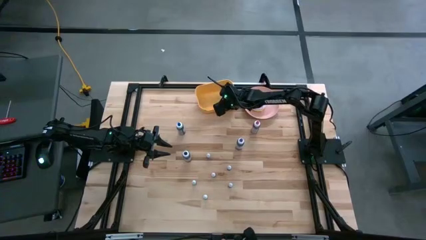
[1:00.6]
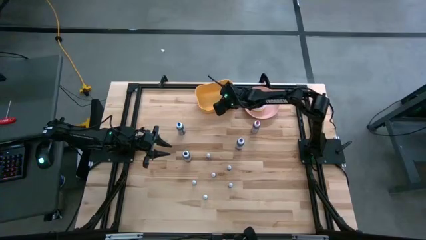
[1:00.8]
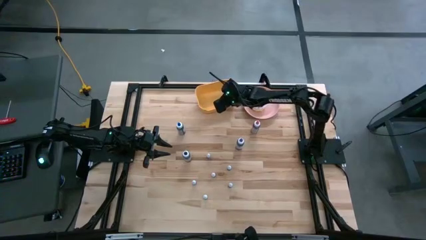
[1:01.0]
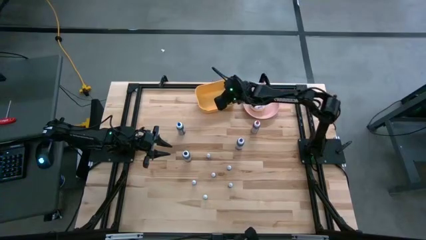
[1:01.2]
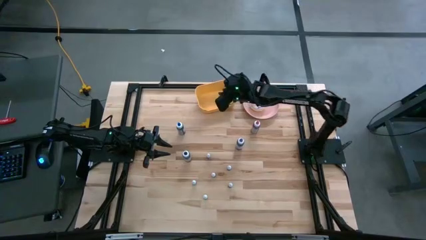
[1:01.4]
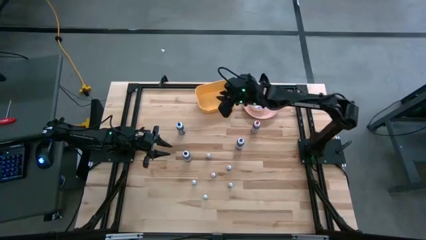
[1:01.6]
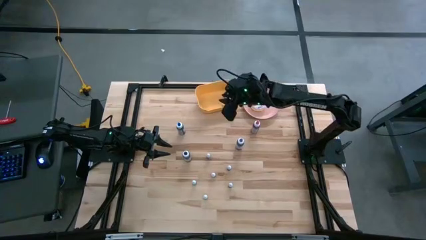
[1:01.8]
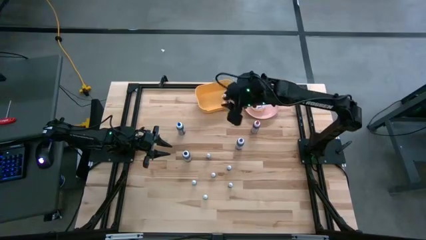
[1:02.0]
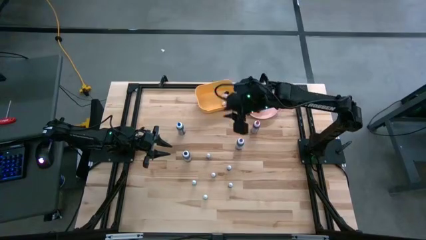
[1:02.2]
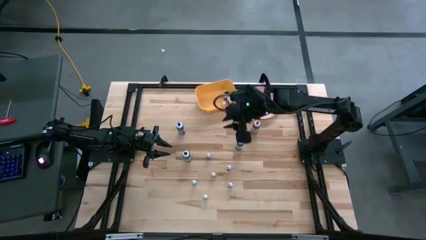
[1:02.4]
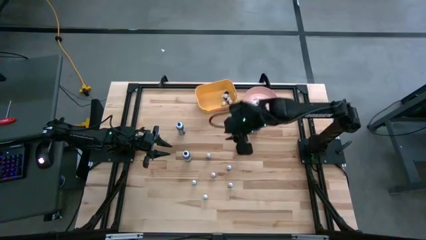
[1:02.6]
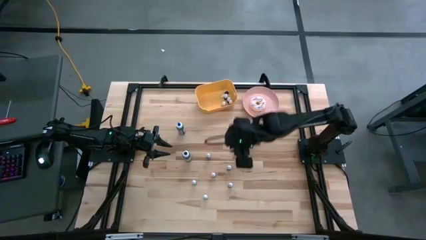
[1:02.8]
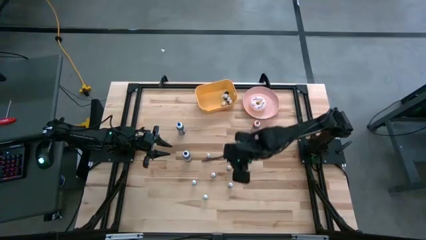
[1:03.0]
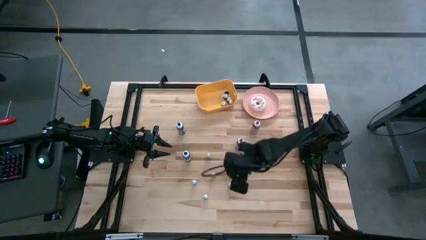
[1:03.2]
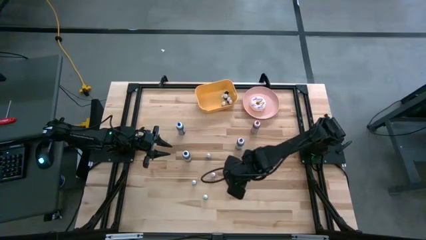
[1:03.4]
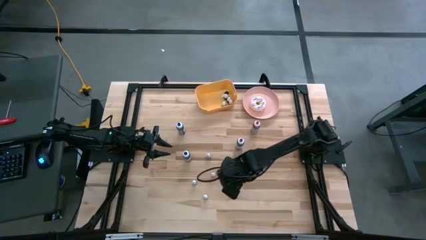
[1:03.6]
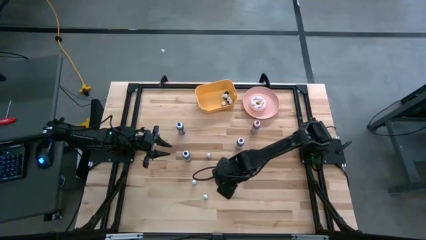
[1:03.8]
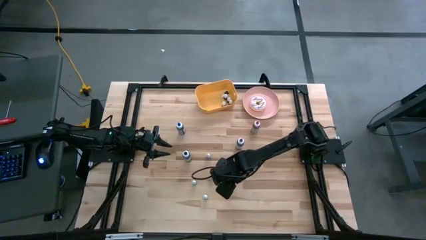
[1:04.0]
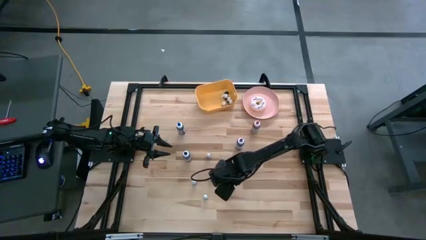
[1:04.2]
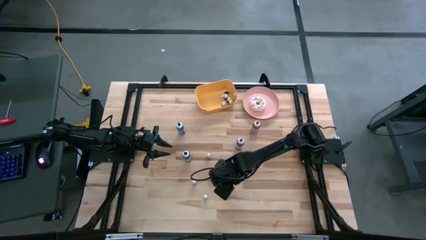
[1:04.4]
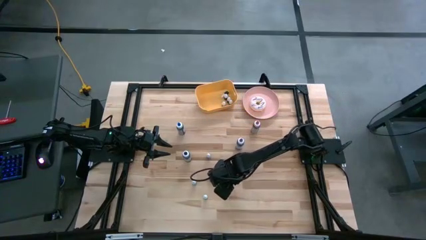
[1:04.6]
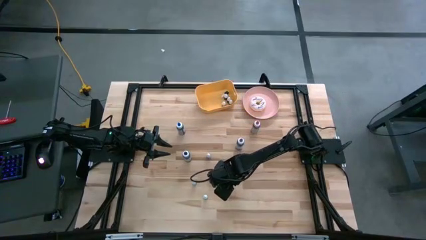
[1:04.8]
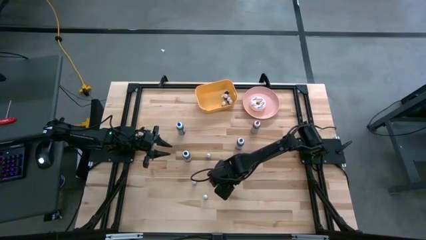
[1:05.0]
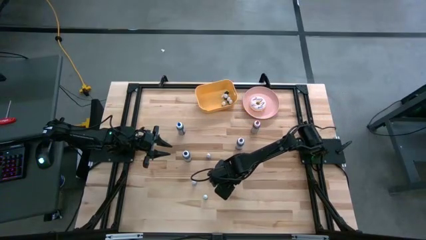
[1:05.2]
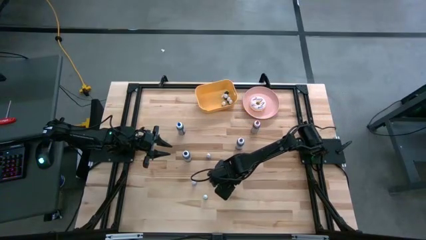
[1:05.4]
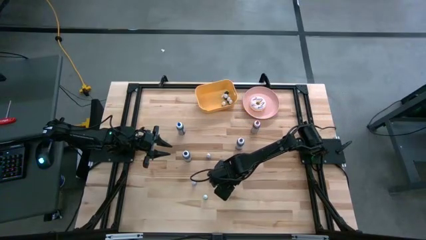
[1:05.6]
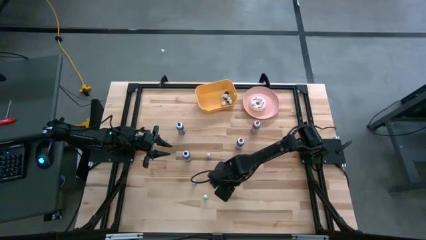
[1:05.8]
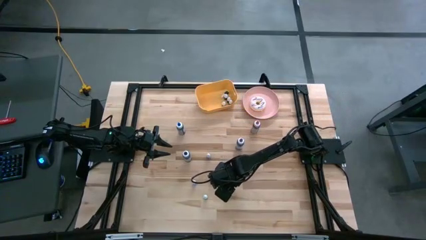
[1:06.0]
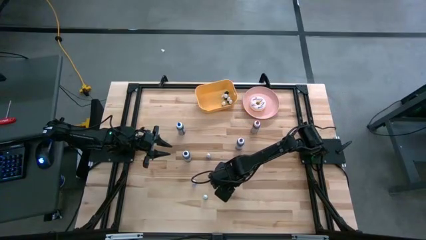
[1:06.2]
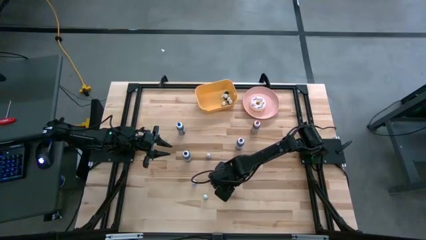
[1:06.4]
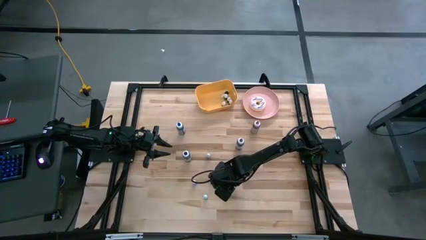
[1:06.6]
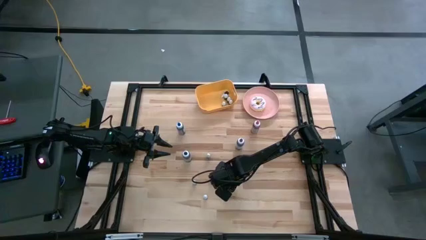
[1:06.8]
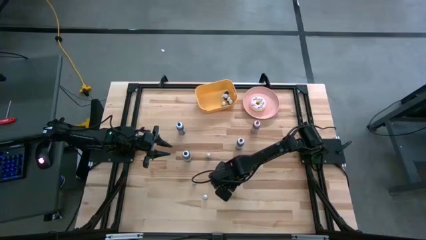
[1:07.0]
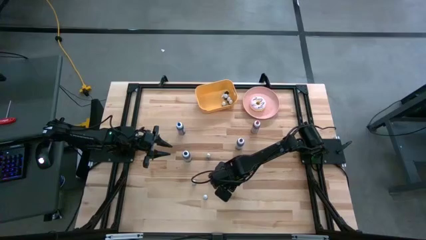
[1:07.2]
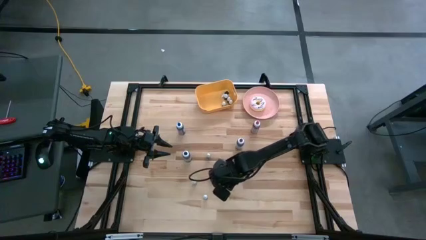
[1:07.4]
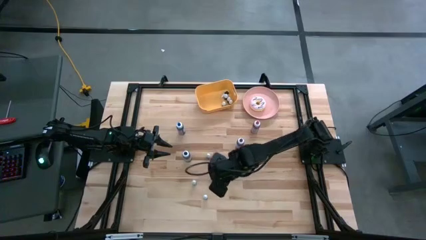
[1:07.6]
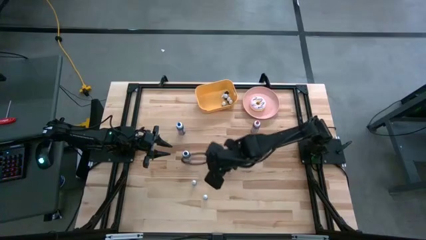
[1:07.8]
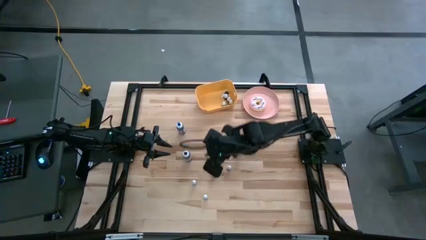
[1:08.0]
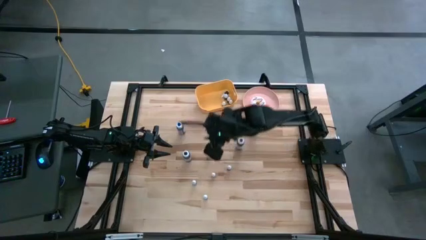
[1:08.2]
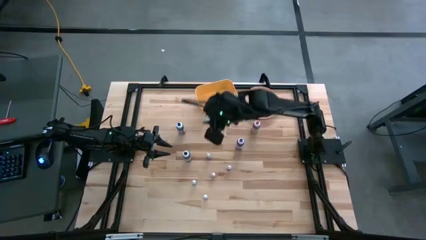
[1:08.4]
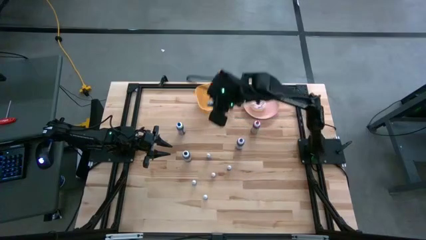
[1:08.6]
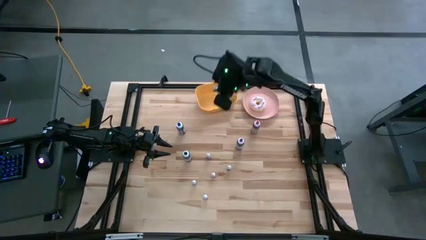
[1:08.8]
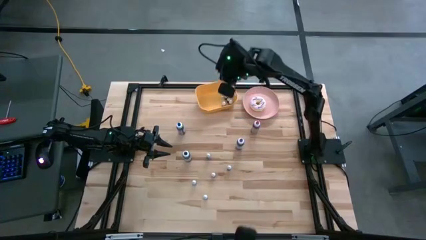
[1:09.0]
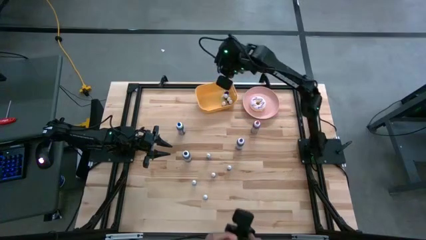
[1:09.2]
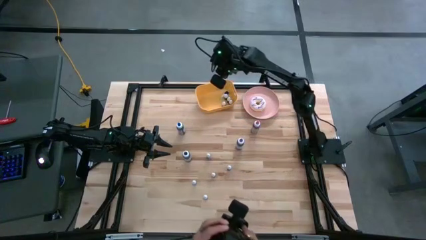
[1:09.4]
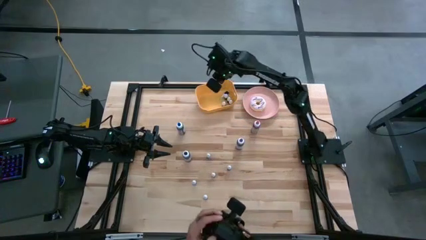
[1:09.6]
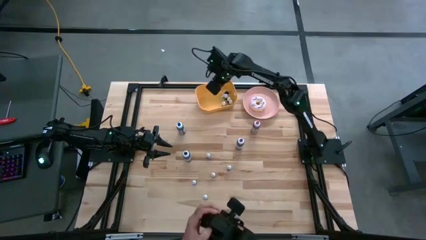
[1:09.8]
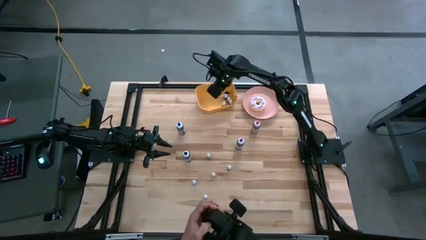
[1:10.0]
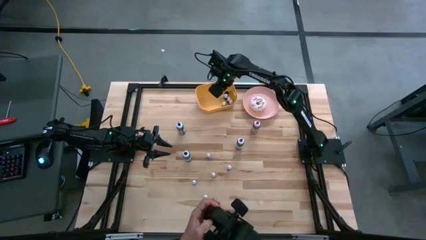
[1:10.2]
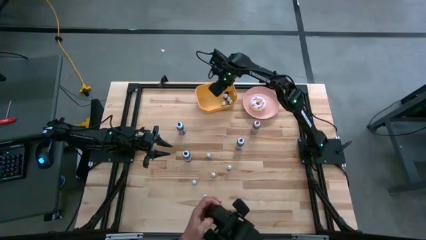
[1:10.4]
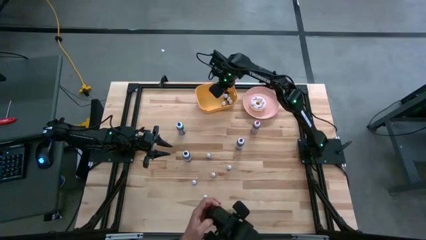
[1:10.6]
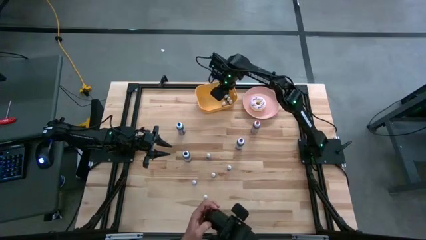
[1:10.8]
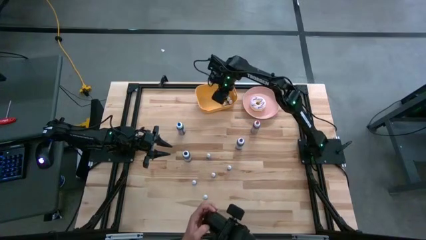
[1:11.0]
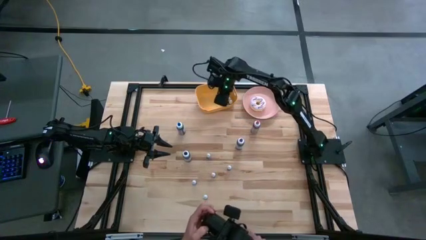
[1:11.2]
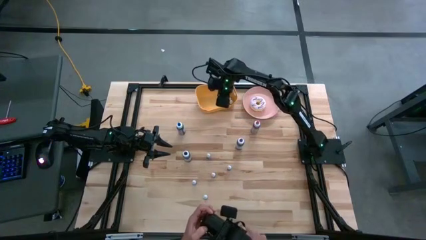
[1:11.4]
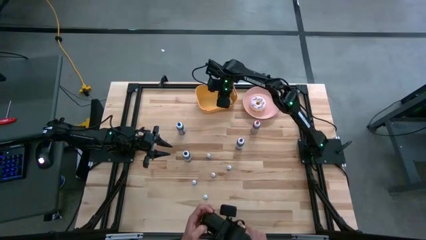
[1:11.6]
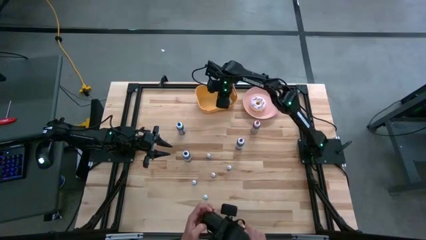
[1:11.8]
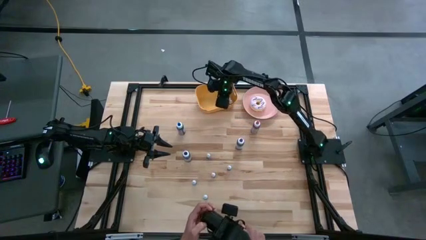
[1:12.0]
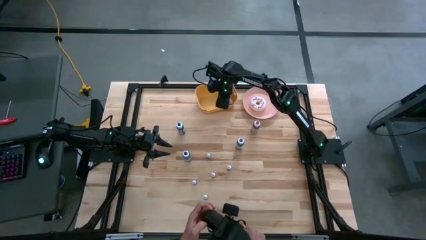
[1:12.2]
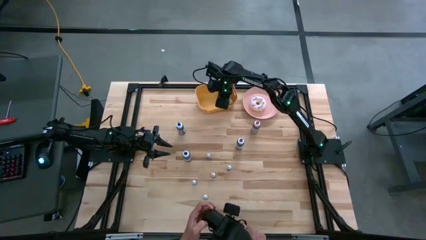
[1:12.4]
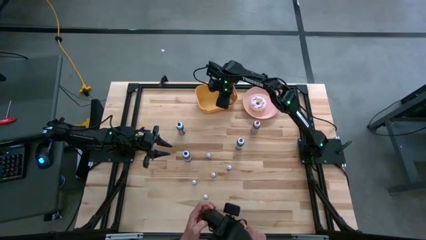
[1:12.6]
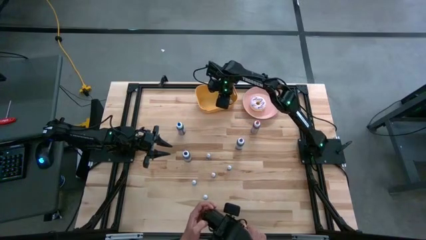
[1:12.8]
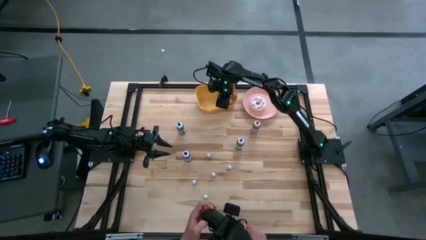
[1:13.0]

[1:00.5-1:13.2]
Task: Pick & Place food coloring
Put the small black food coloring bottle into the yellow bin

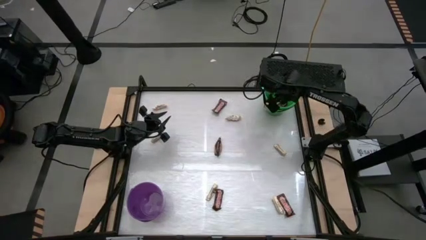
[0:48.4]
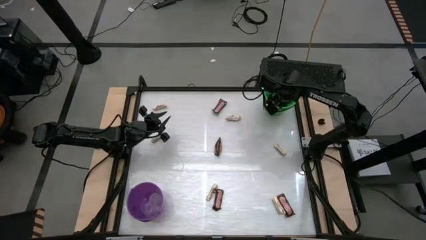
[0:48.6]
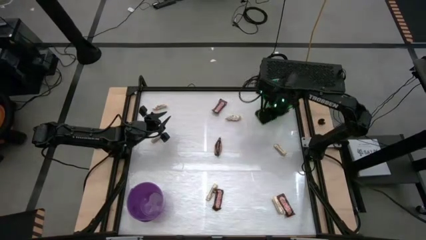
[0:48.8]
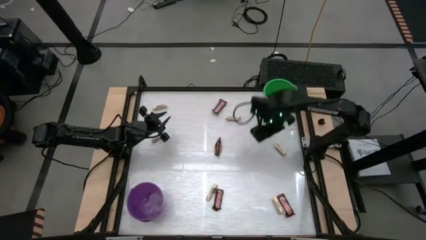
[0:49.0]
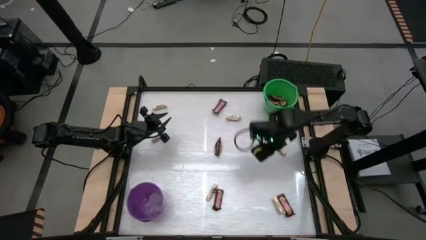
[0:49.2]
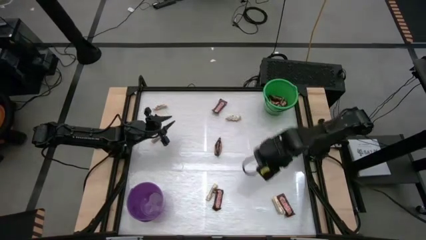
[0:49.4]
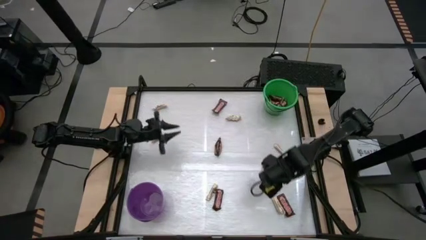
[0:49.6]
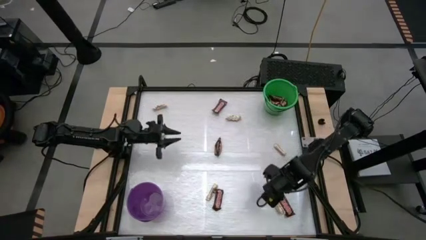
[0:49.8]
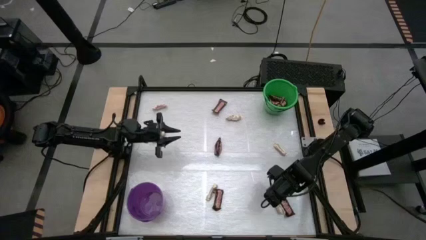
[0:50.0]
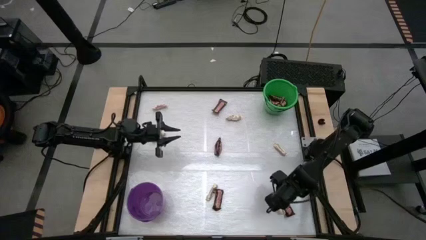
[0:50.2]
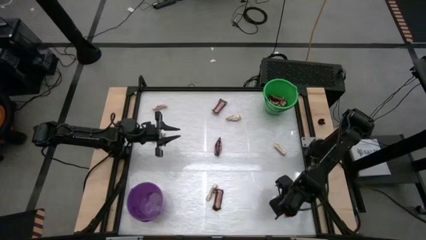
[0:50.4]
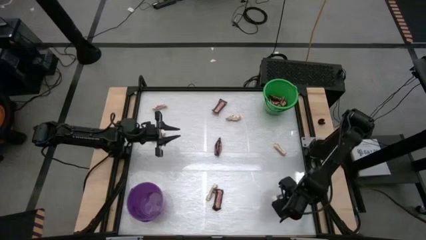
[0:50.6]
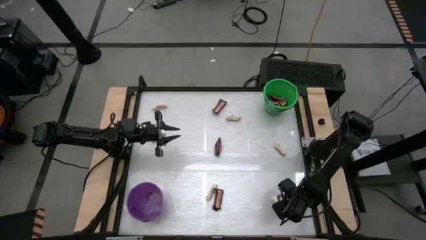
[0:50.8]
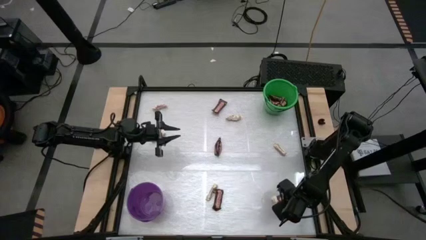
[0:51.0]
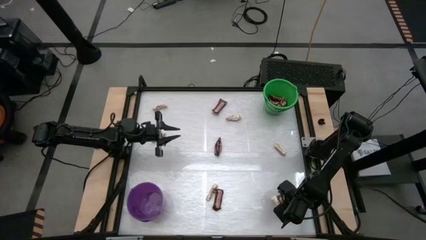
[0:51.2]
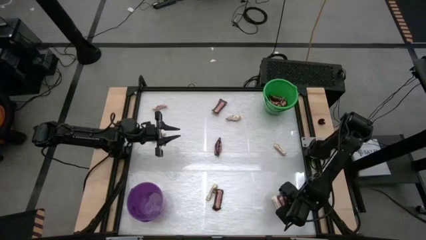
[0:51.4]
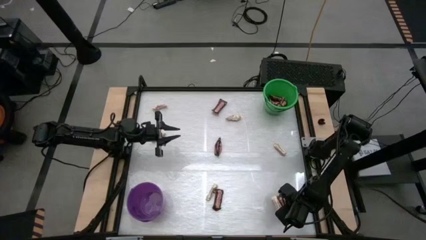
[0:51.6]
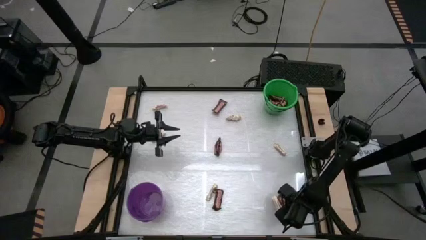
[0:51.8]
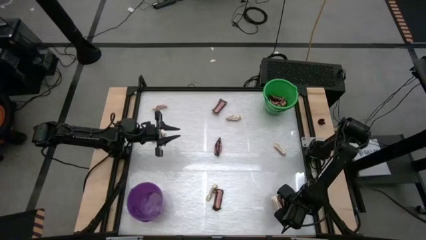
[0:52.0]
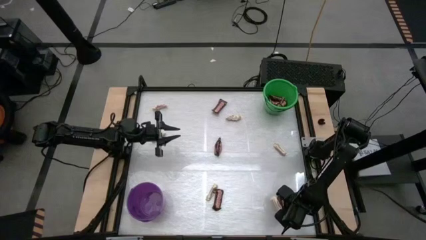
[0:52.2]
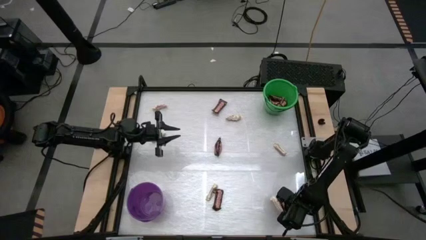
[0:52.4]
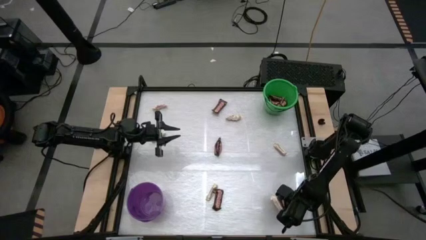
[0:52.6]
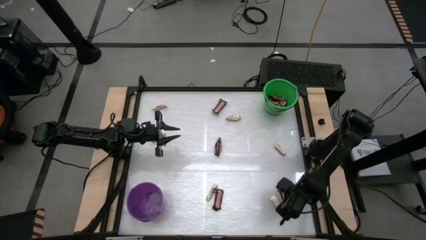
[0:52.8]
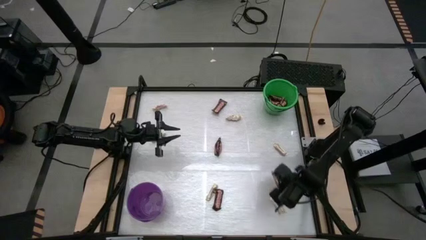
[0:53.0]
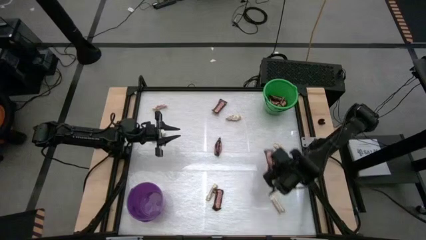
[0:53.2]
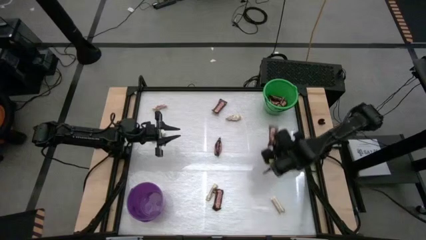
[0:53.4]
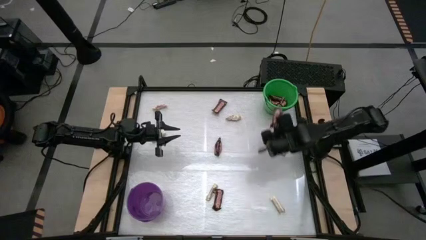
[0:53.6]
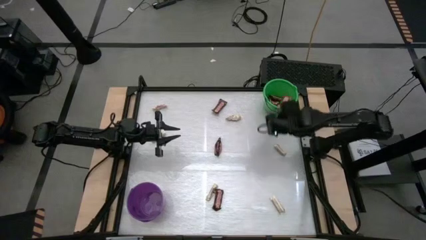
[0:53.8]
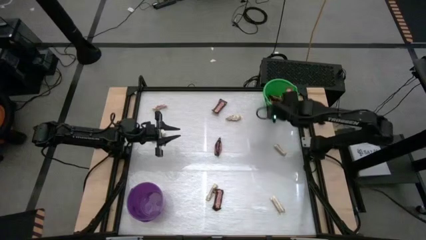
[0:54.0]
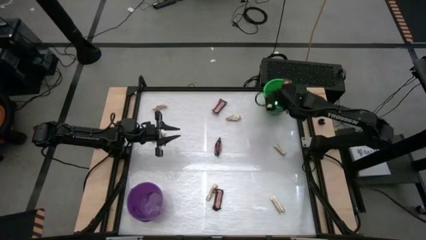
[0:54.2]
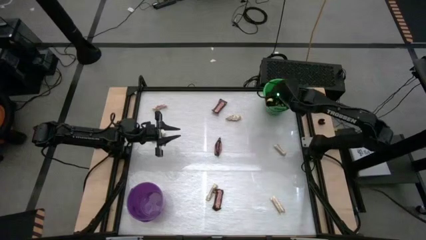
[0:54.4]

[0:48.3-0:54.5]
Task: Sort candy by brand, put in halloween buckets
Put the brown candy bar into the green bucket
